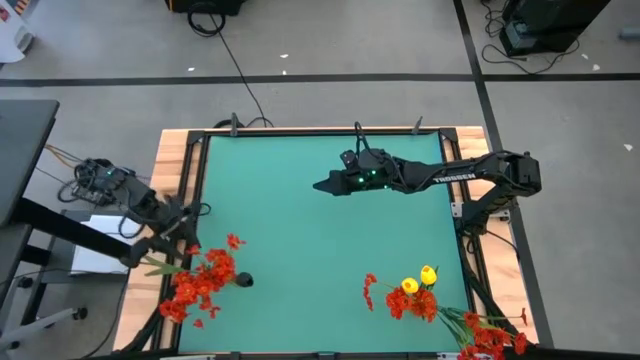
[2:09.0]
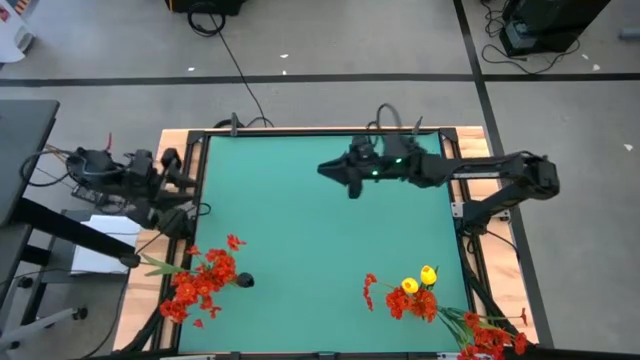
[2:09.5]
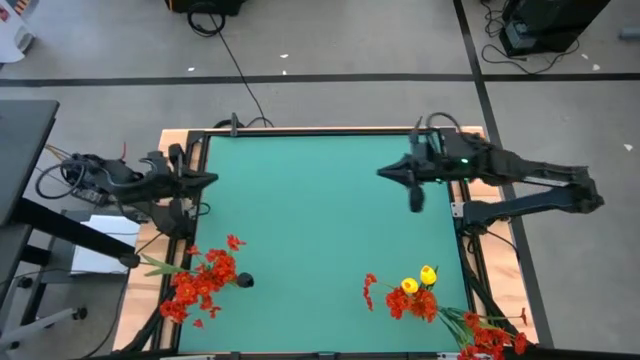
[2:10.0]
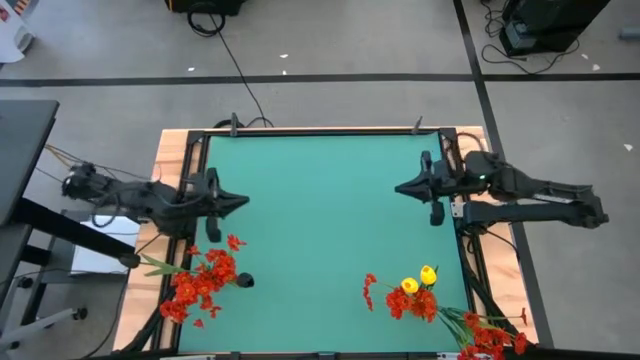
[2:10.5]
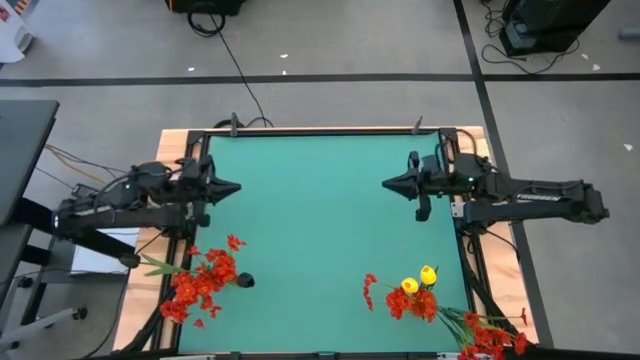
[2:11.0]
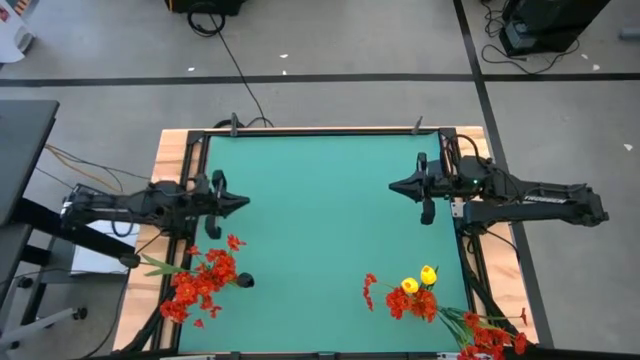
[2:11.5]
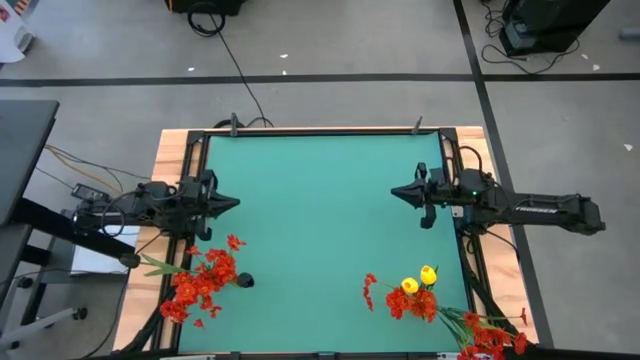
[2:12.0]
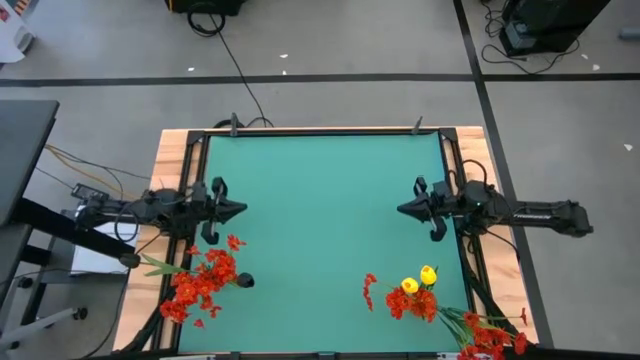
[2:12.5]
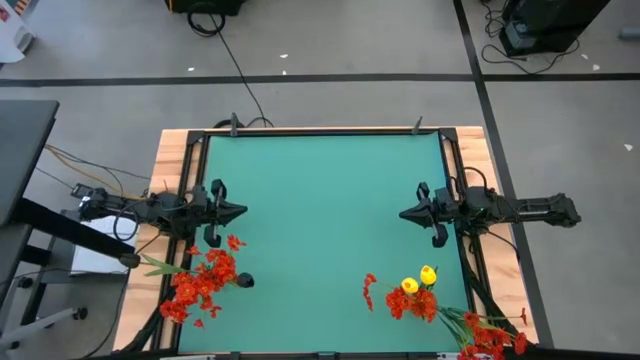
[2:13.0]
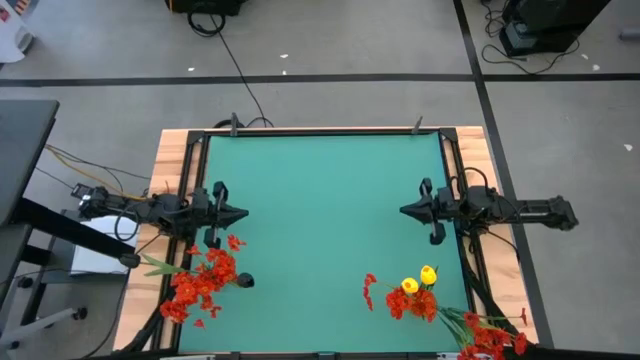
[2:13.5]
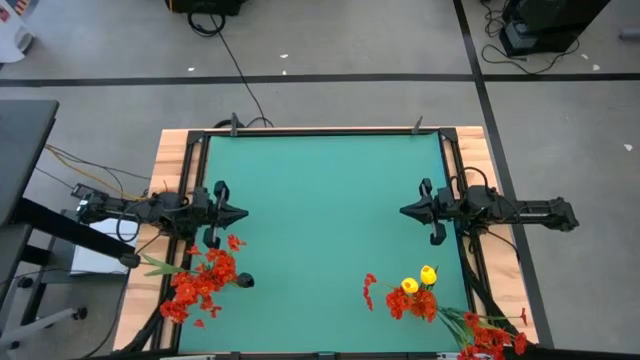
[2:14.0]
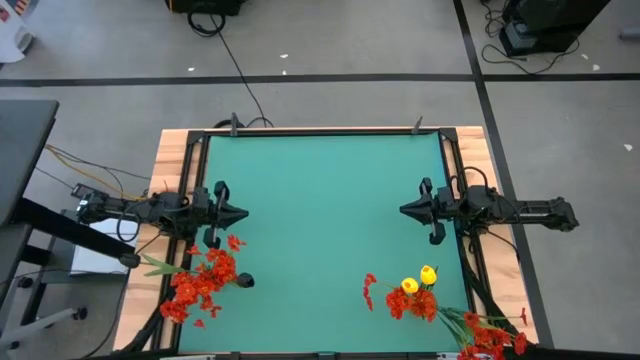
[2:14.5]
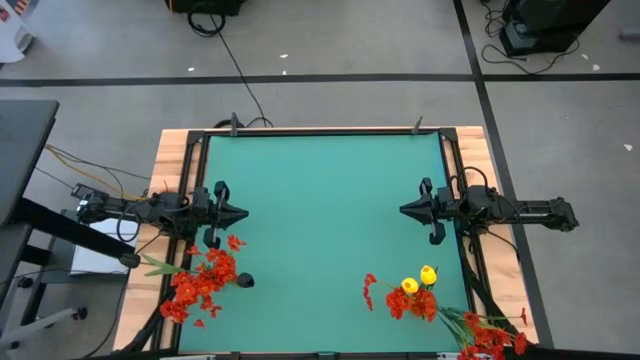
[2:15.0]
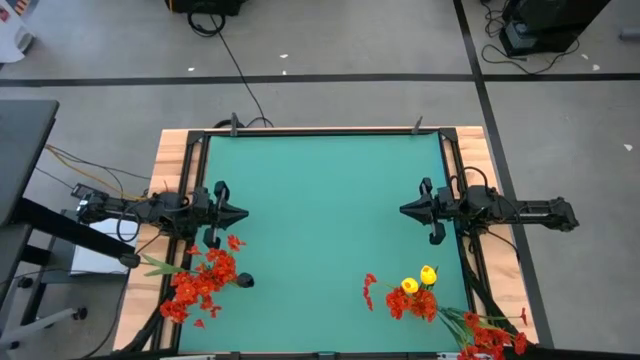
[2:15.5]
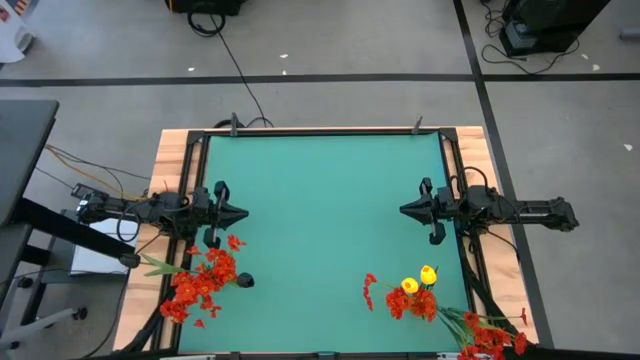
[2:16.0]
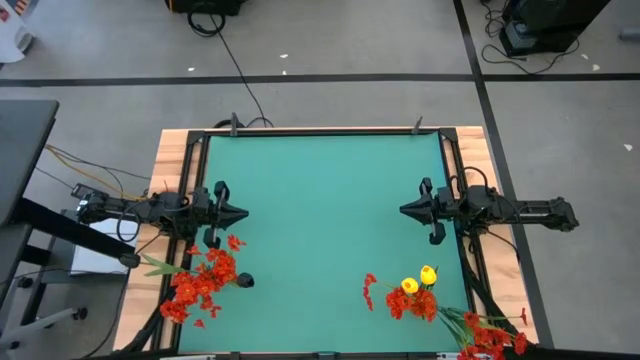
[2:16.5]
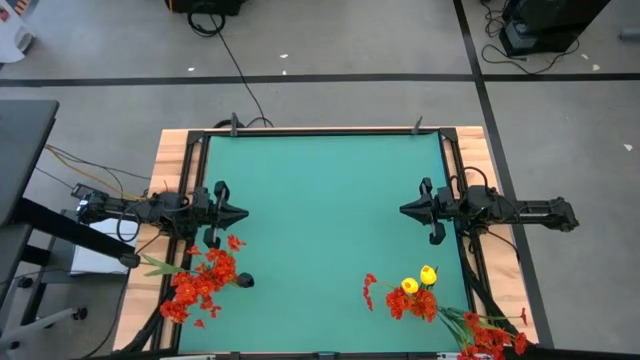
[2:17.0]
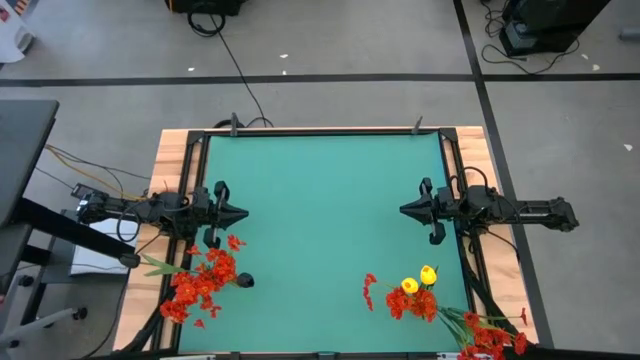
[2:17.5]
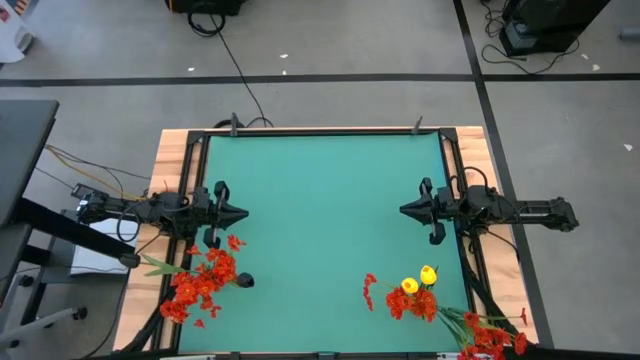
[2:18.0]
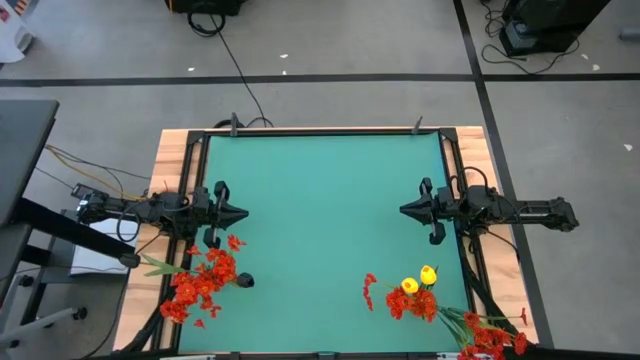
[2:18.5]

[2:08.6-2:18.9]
Task: Sort flowers into vase by color
Return to Home Position

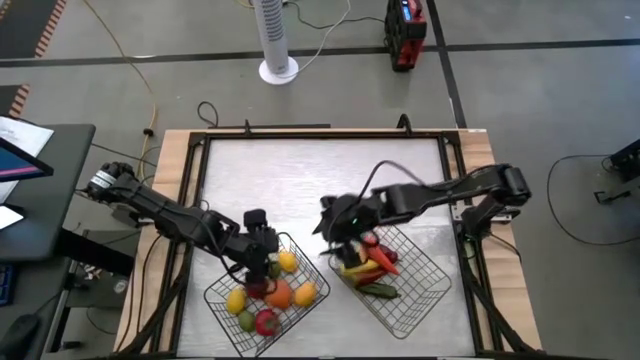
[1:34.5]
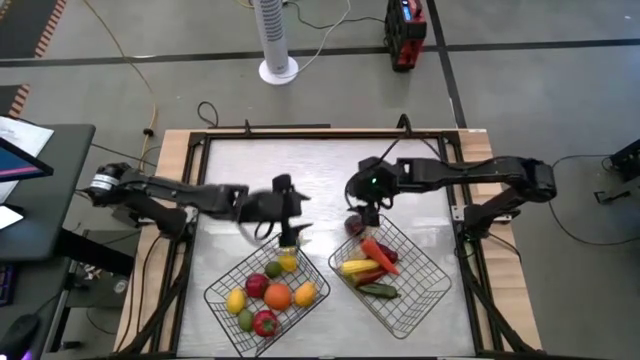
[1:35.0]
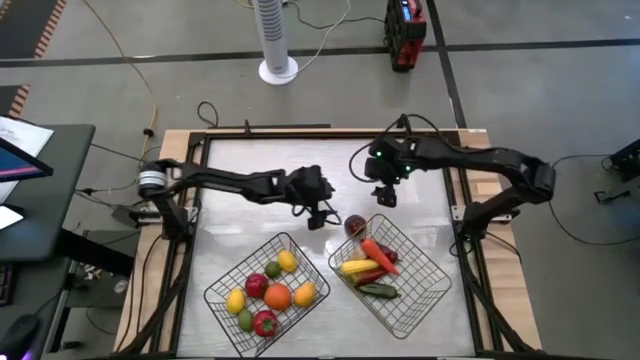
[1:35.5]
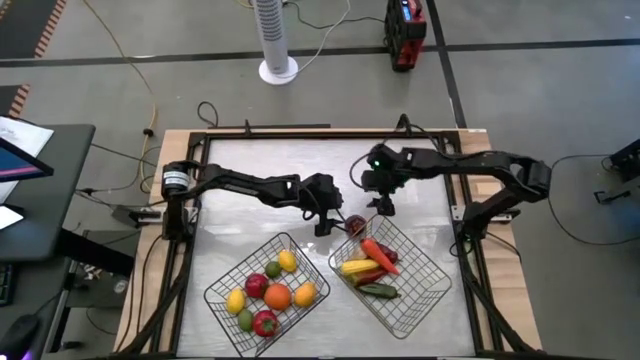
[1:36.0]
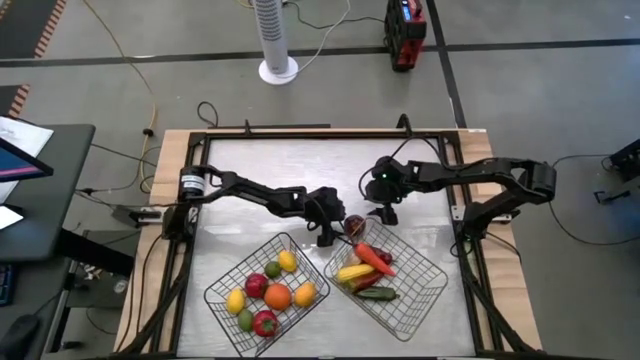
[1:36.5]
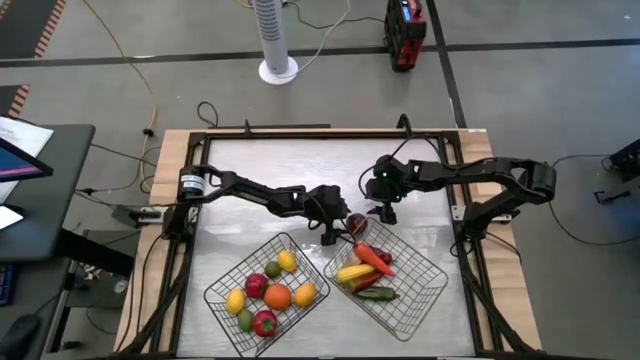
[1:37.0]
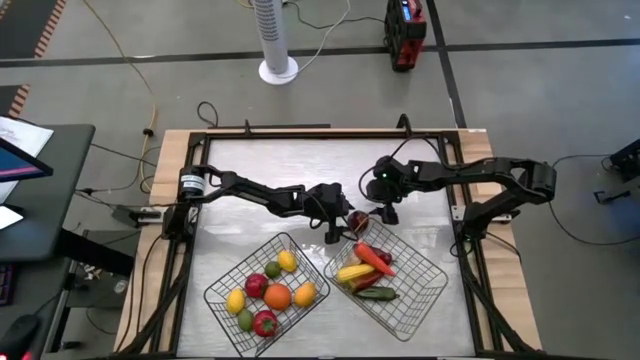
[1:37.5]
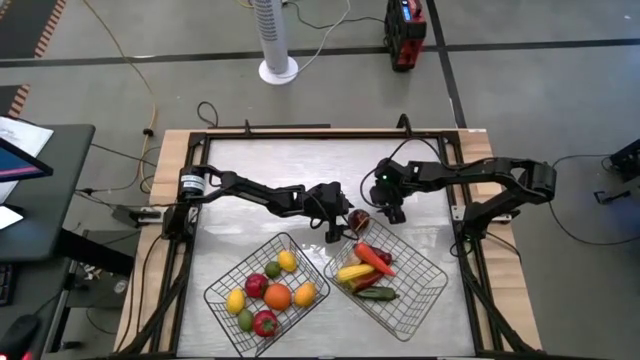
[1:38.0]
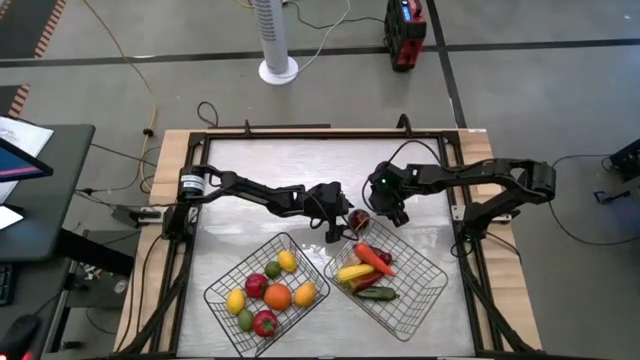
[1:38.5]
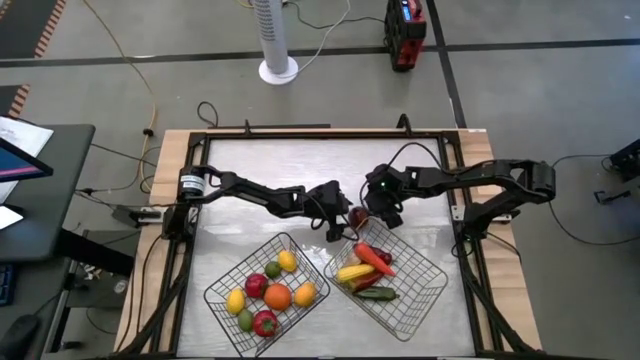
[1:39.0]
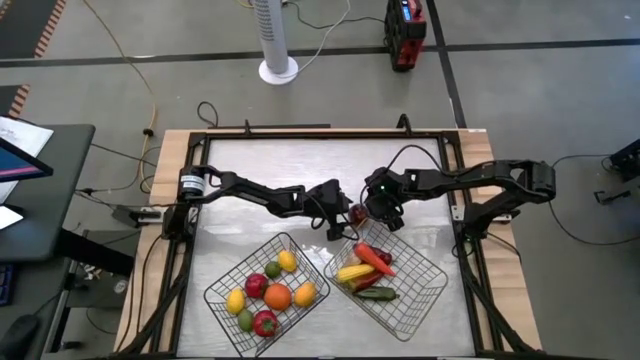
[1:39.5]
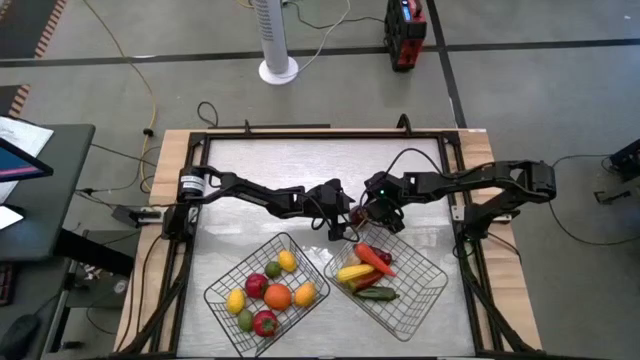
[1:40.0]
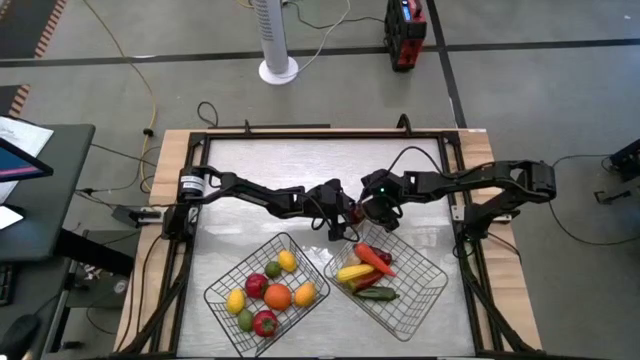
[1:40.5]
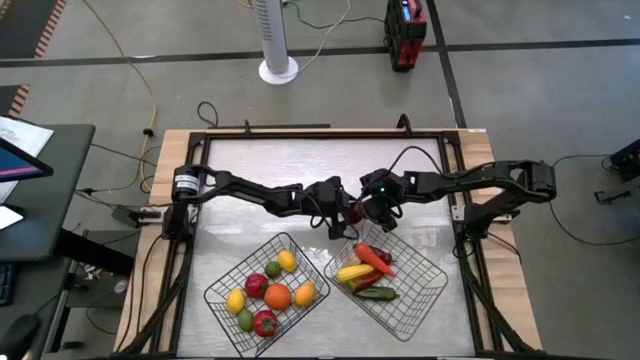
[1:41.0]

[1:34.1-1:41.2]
Task: Sort produce into baskets
Put the red apple into the black basket

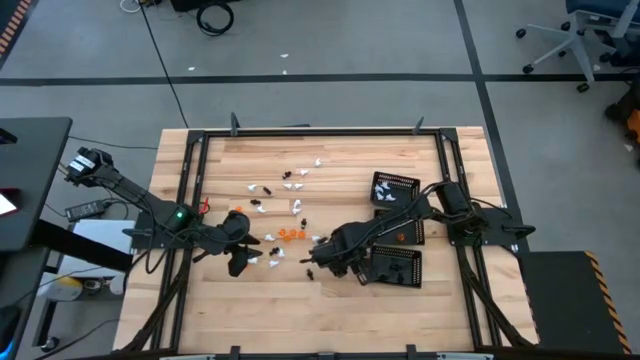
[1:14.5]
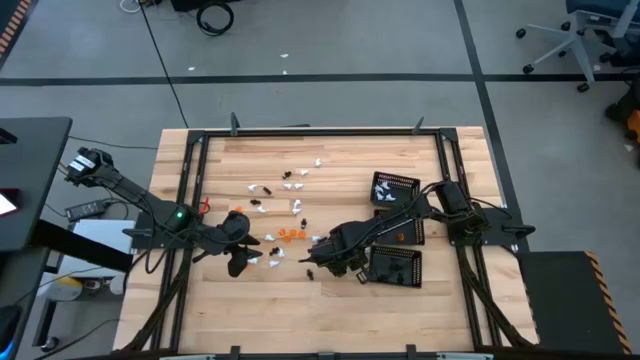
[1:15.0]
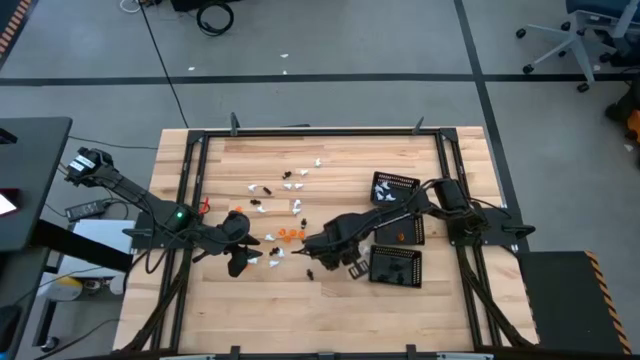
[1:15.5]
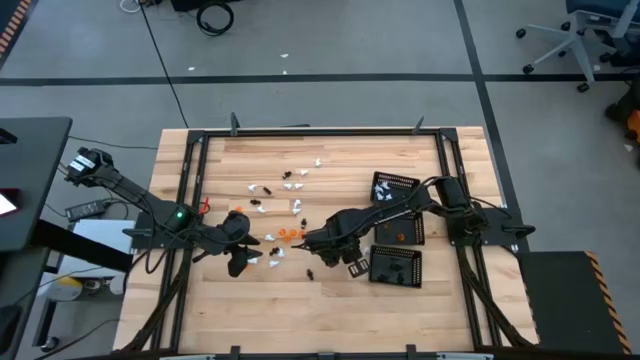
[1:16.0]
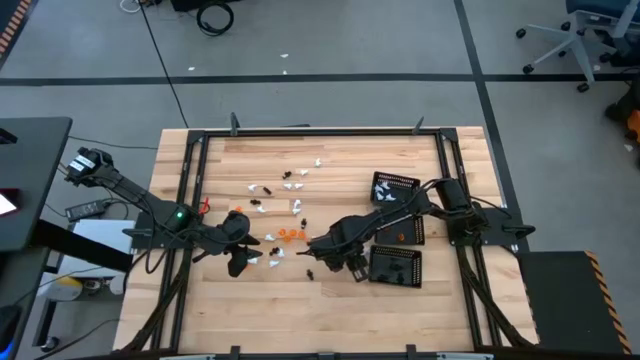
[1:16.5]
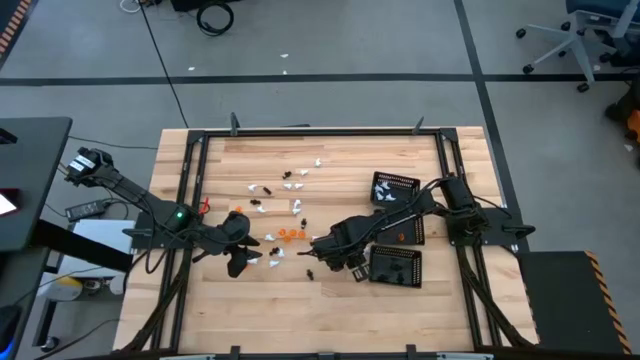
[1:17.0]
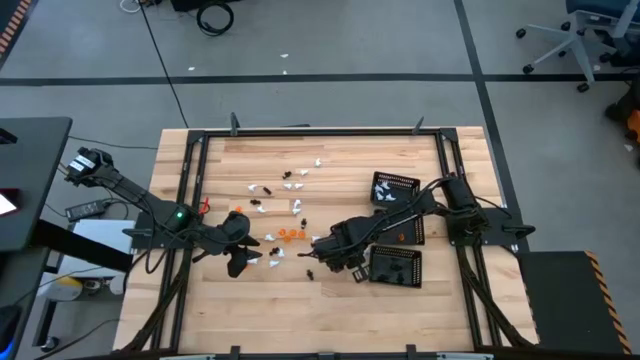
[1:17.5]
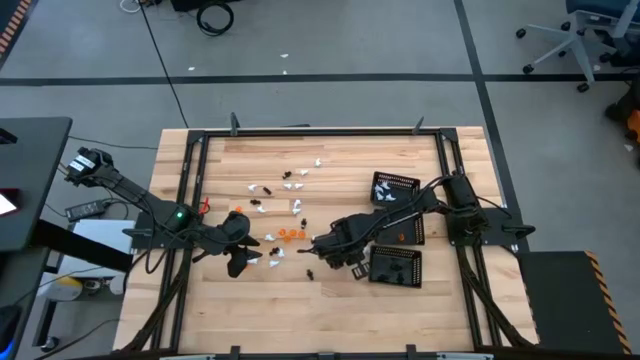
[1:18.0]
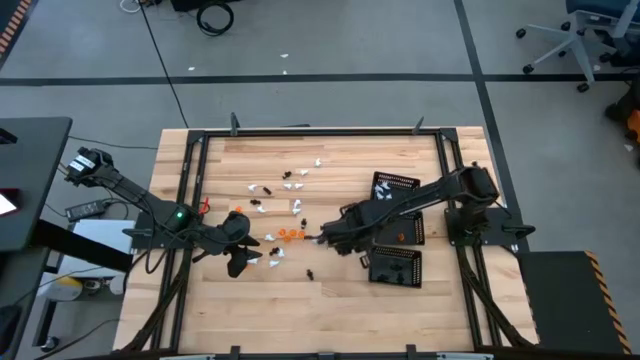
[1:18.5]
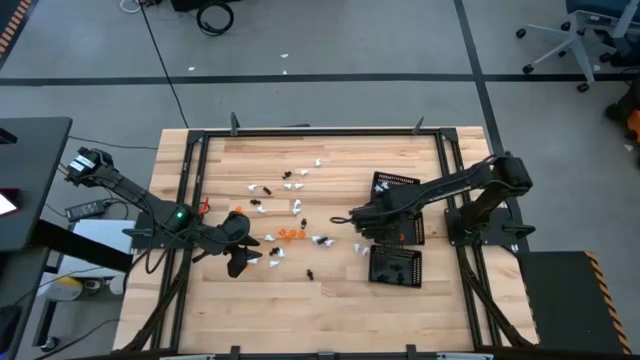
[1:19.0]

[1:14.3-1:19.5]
Task: Sort Halloween decoration
Put the orange pumpkin toy into the center black bin
